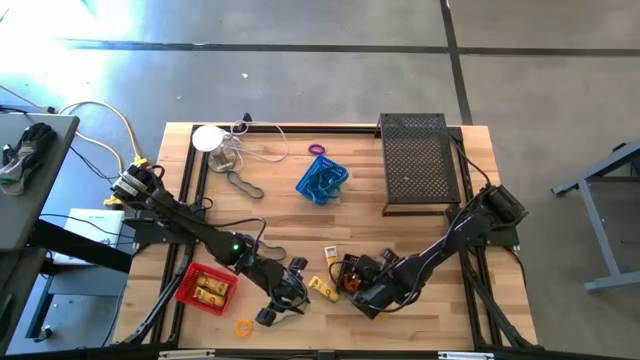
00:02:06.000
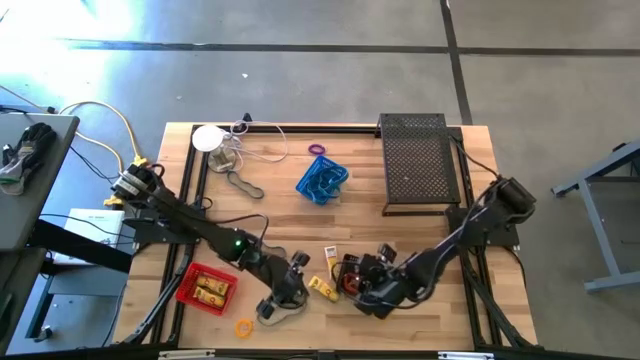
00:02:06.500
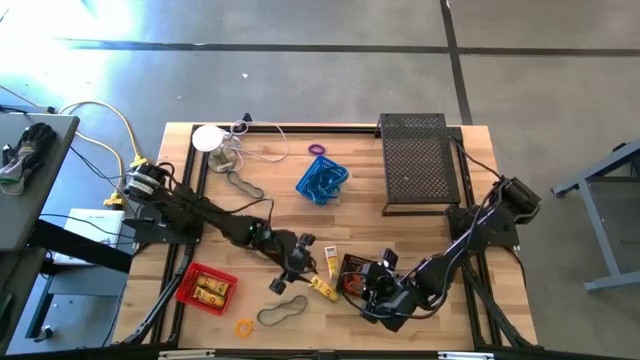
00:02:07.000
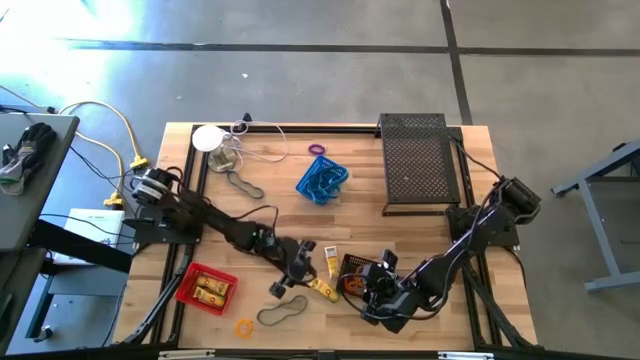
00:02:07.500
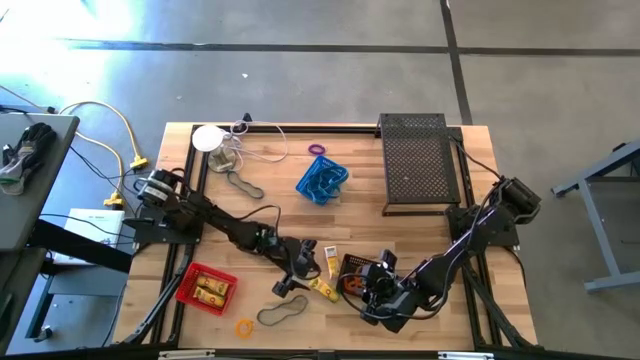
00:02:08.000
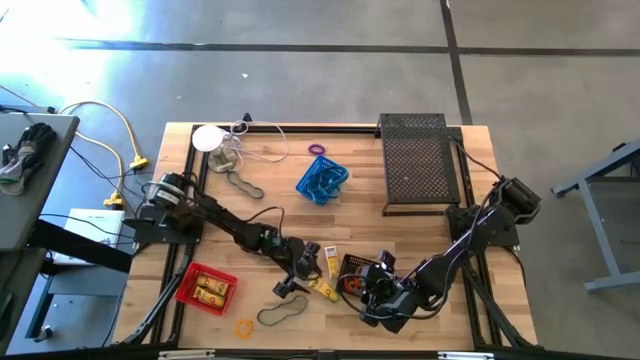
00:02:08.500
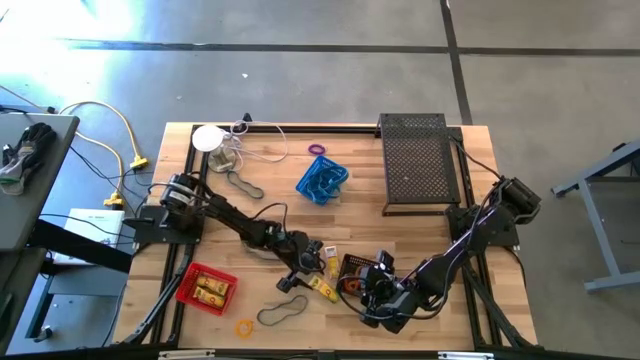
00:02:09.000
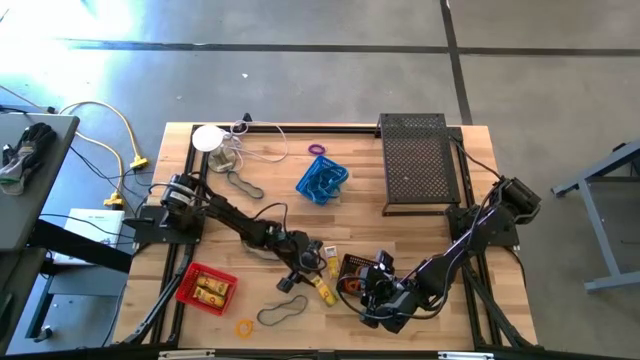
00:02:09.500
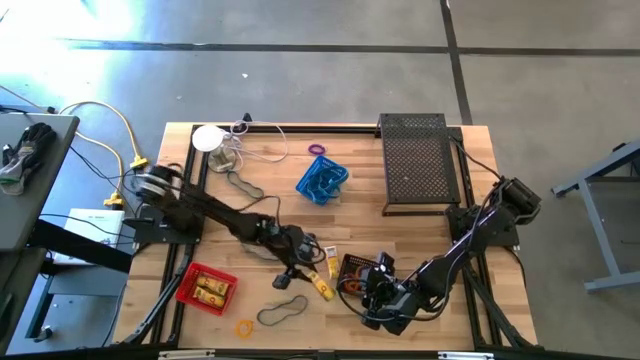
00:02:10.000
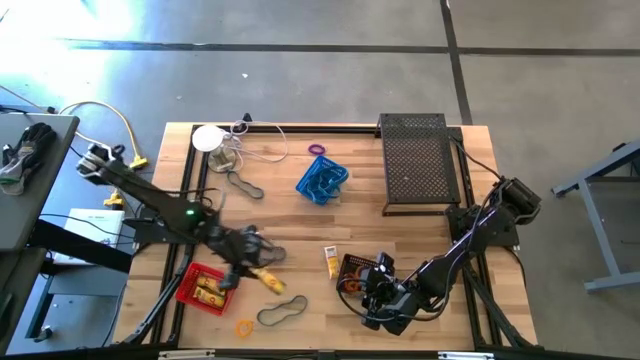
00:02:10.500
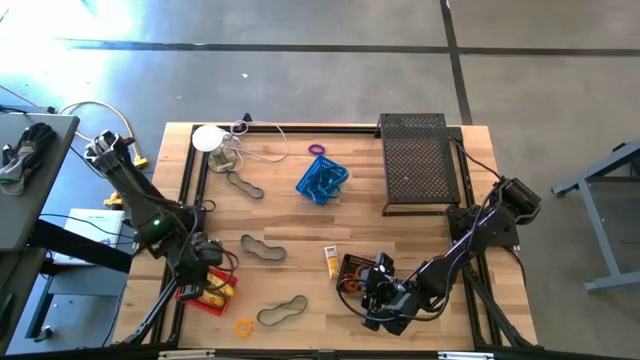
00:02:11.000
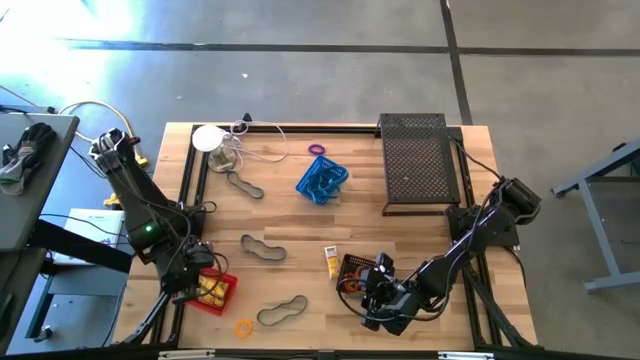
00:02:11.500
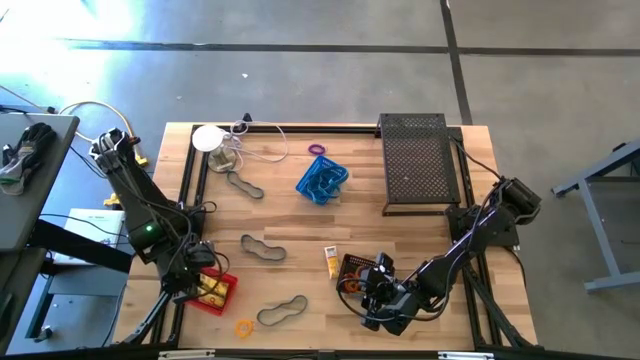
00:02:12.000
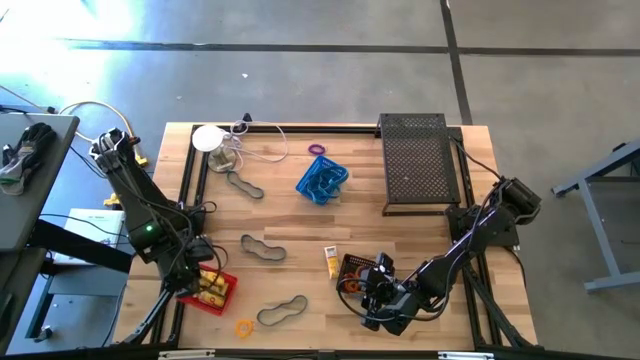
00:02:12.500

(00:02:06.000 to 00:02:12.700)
Task: Pick & Place Office Desk Supplies
Put the middle crayon box into the red bin

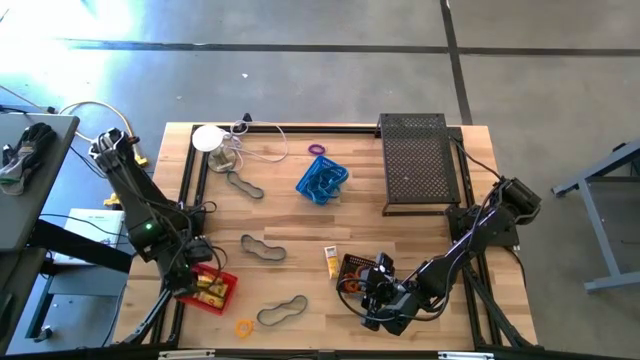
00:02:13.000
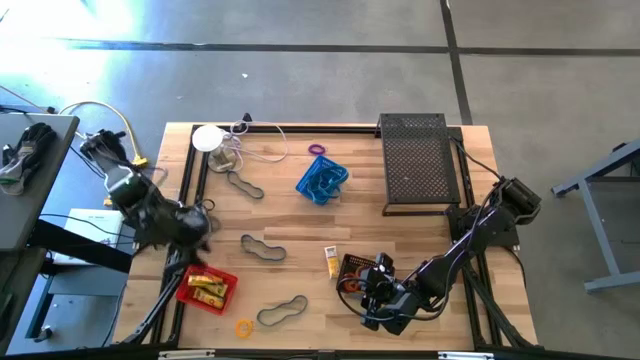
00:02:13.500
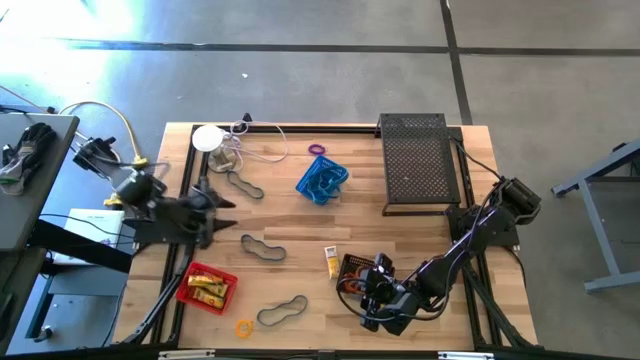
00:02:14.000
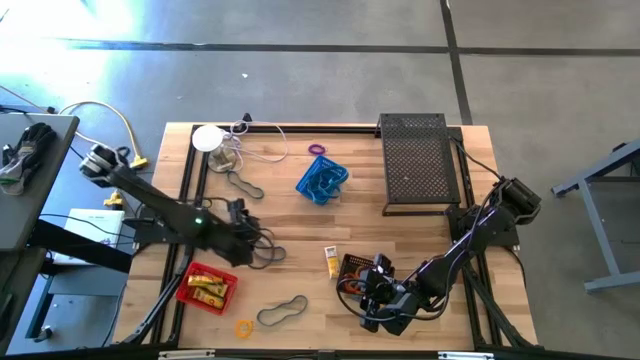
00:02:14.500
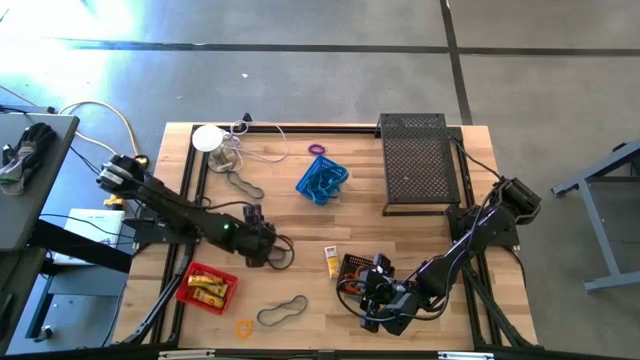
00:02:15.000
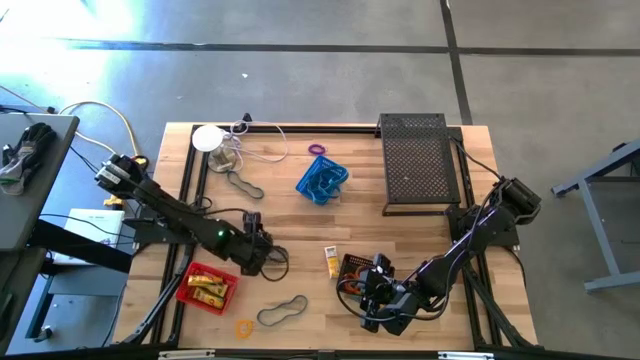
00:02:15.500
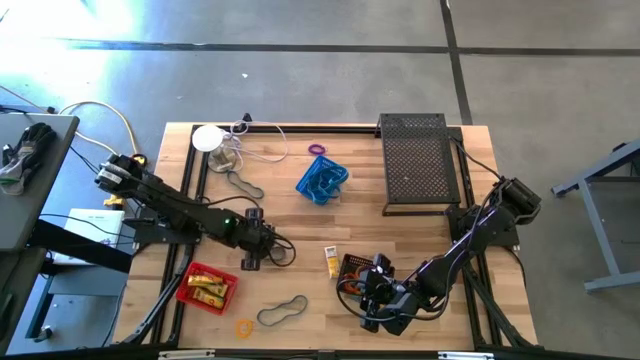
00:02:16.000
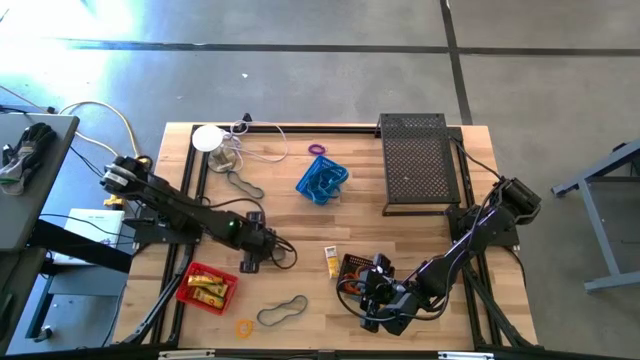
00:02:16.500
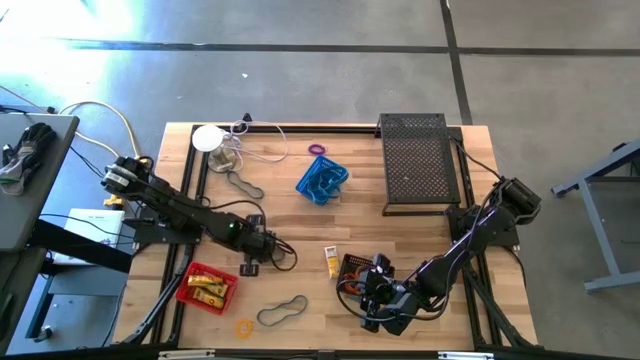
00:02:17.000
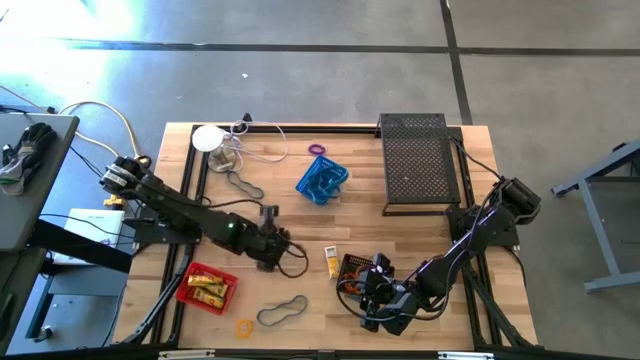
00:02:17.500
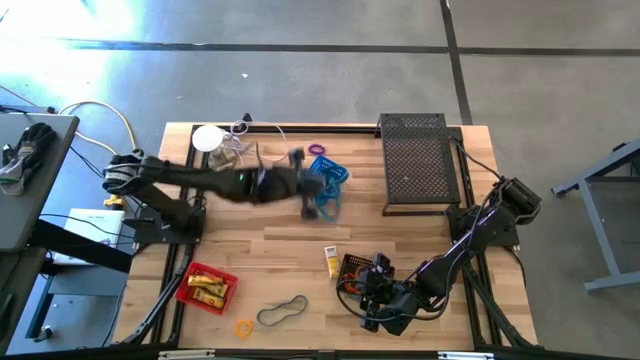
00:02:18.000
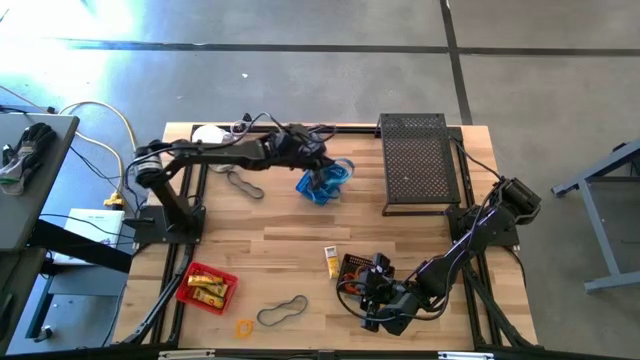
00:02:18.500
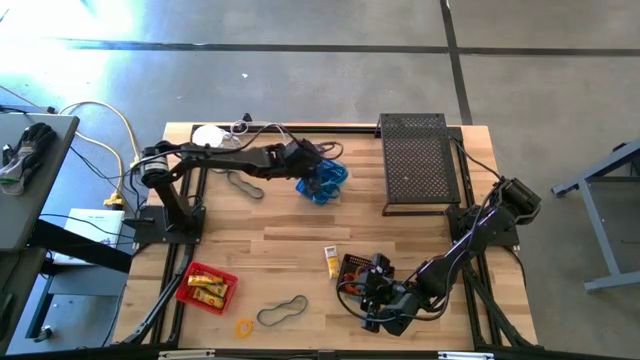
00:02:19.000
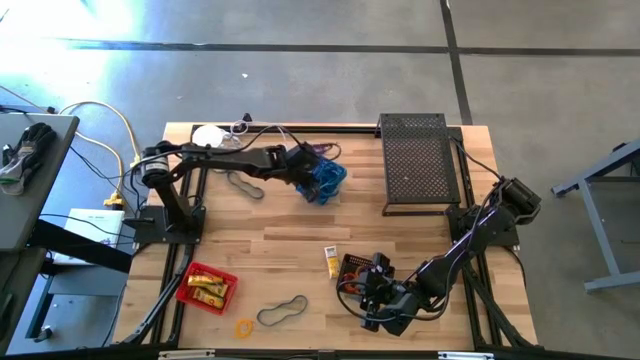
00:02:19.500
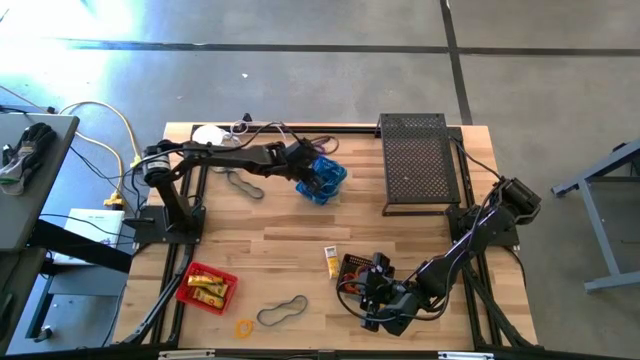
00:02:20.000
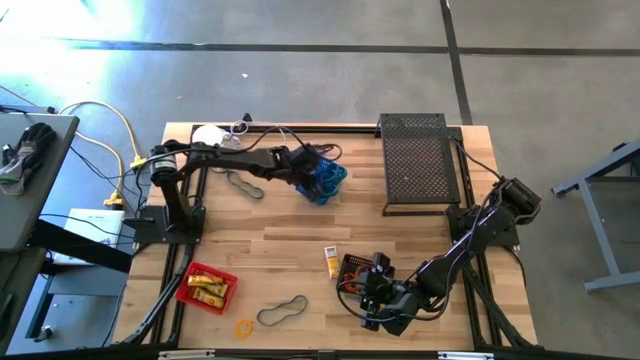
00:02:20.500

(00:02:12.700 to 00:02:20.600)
Put the middle blue rubber band into the blue bin

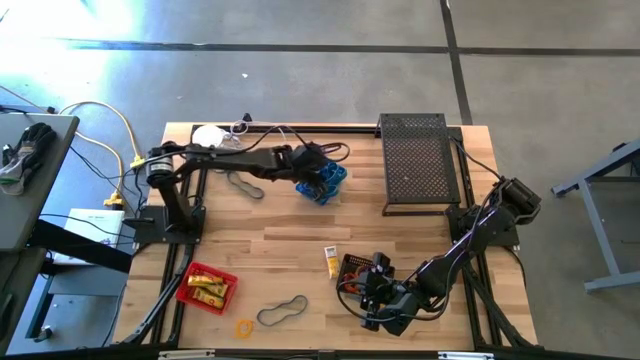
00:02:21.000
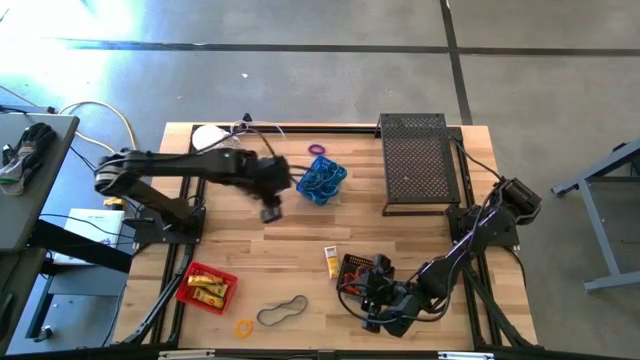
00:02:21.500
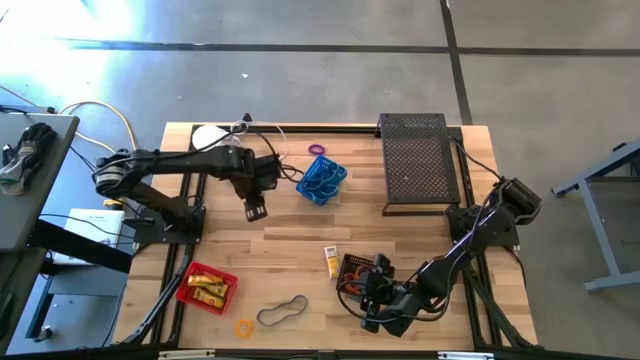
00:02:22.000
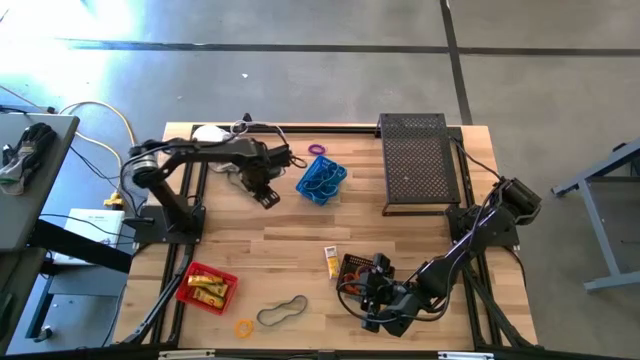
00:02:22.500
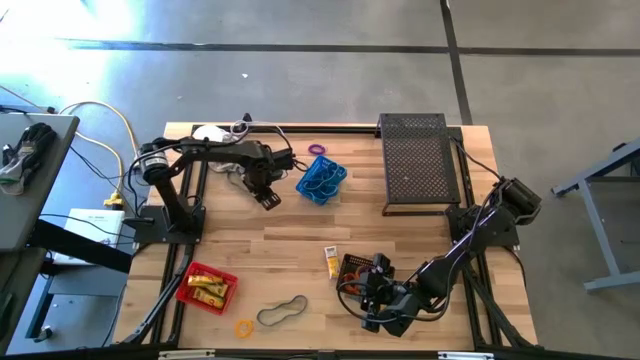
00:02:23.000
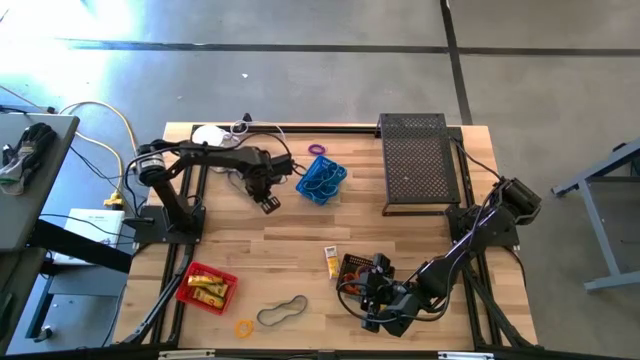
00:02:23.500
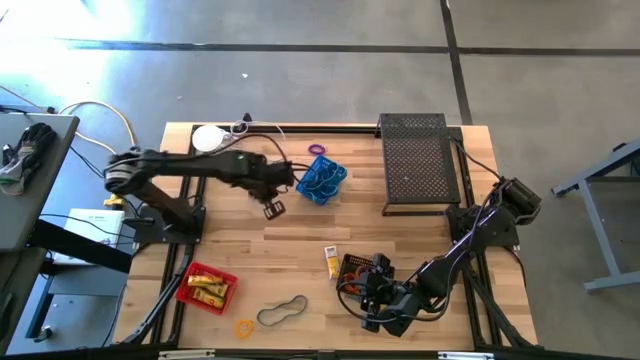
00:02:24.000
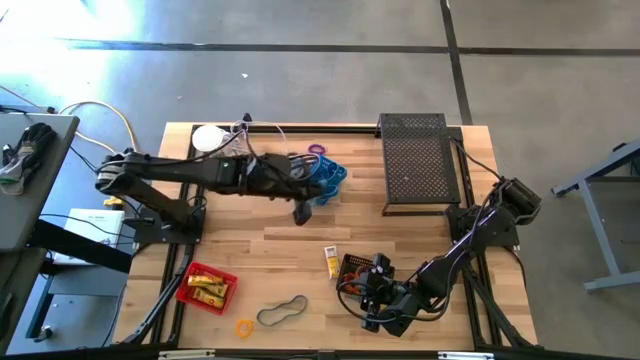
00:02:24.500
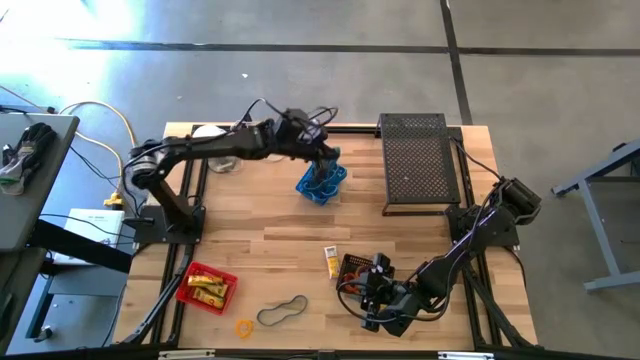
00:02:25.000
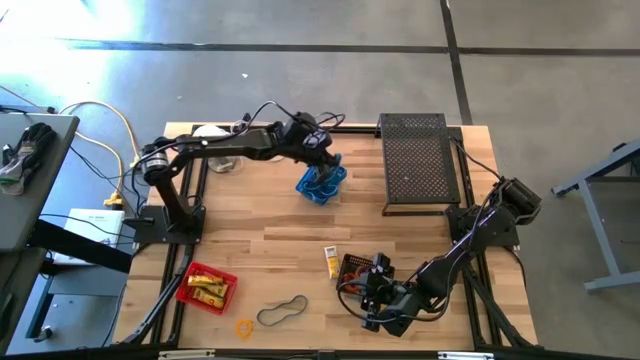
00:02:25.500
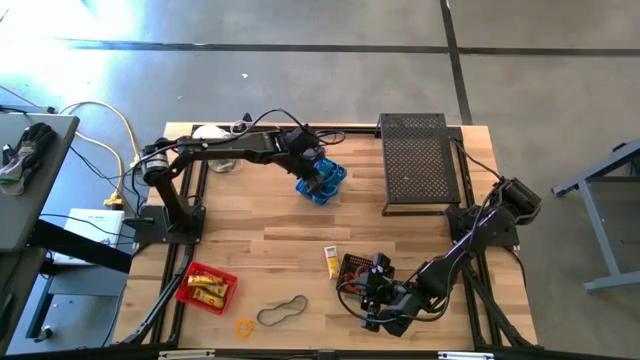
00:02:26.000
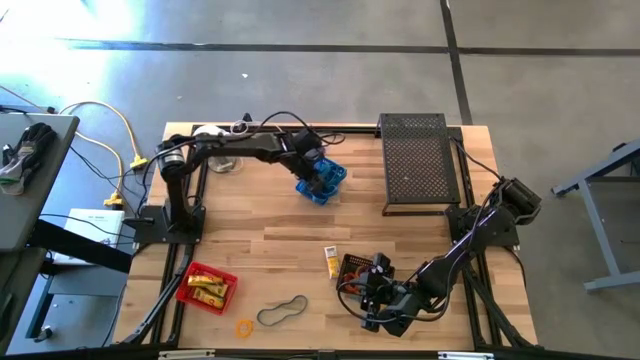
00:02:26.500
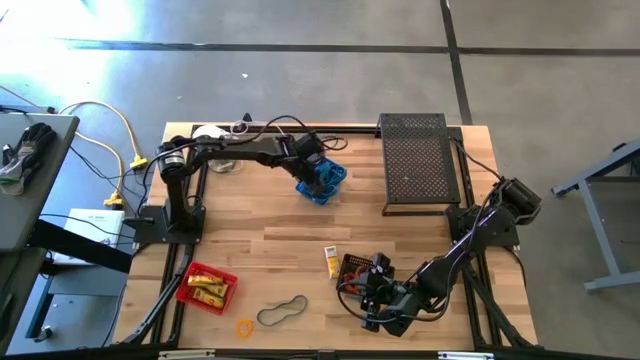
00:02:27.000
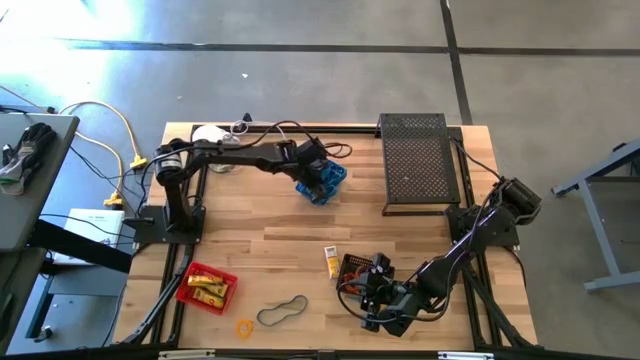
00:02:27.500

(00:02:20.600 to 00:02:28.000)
Put the top blue rubber band into the blue bin
